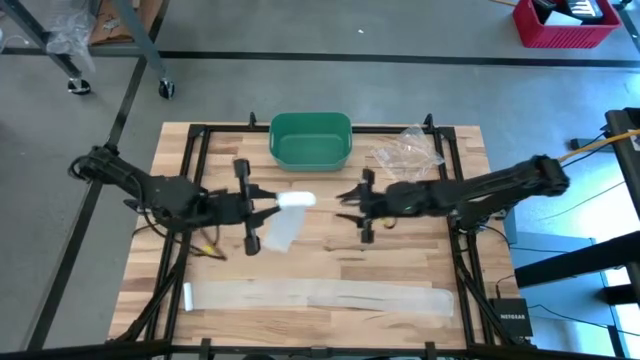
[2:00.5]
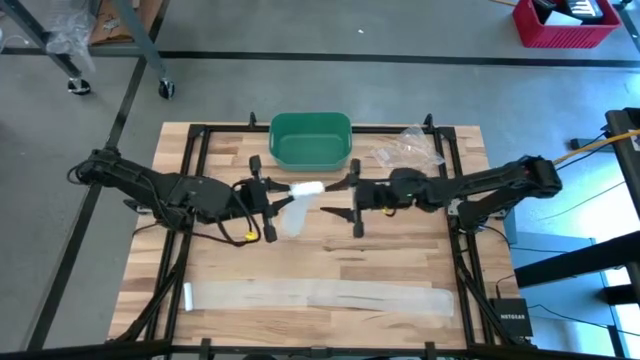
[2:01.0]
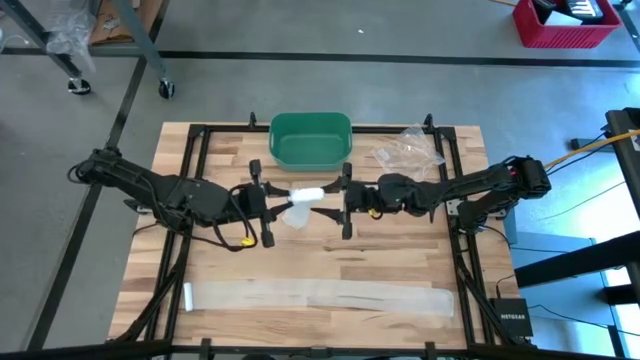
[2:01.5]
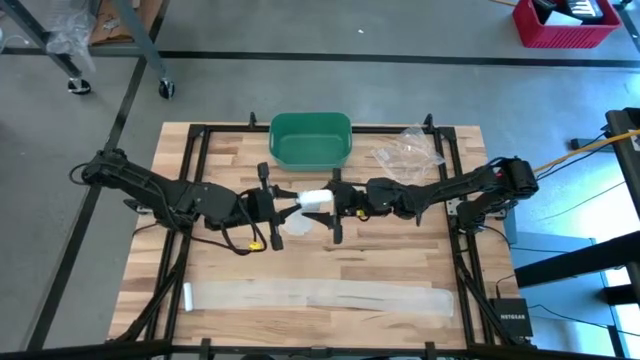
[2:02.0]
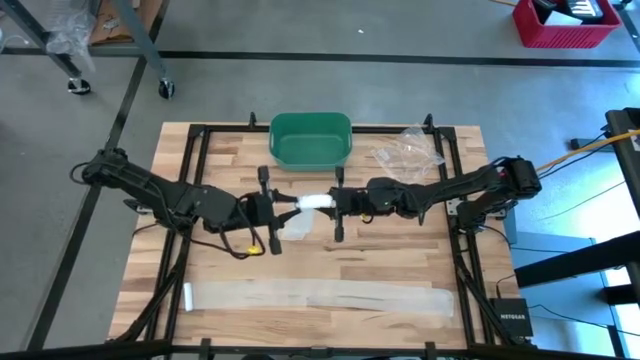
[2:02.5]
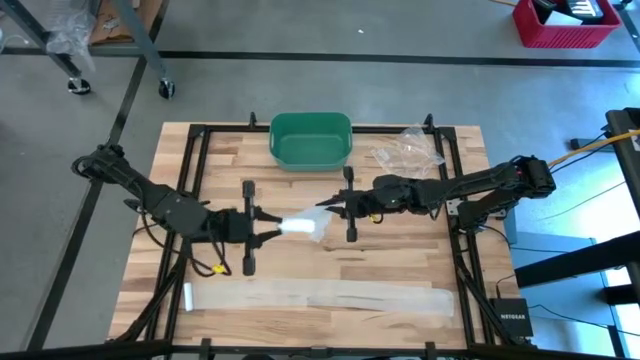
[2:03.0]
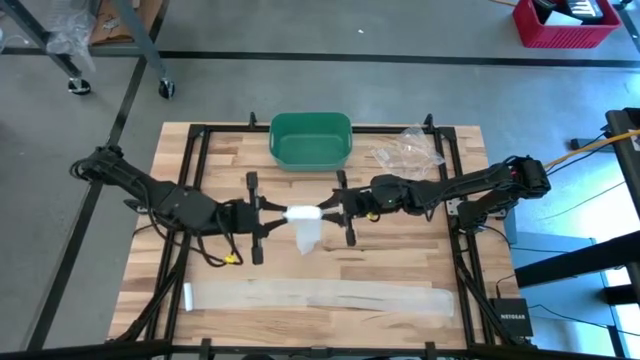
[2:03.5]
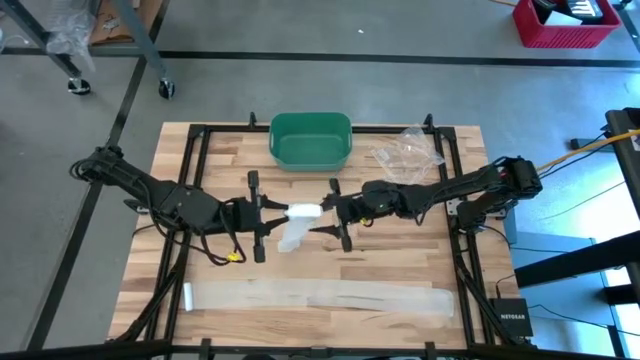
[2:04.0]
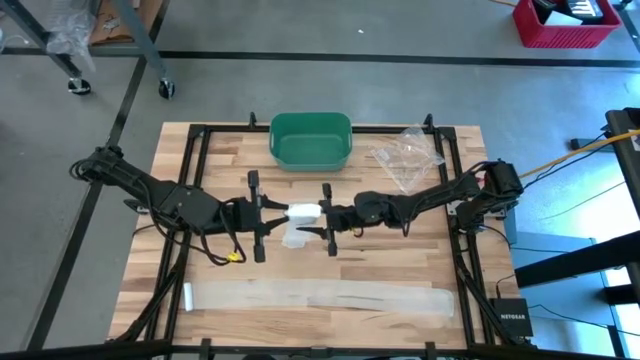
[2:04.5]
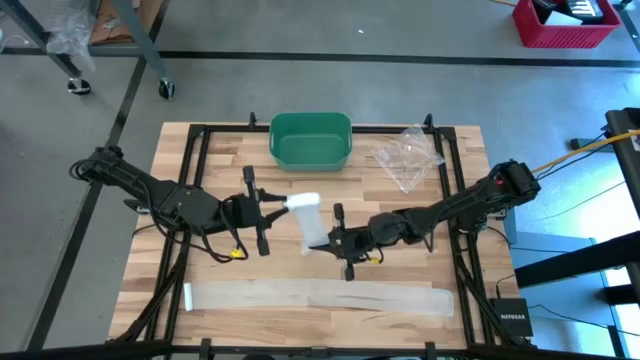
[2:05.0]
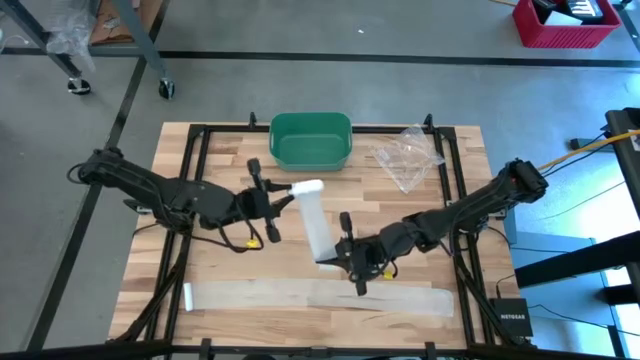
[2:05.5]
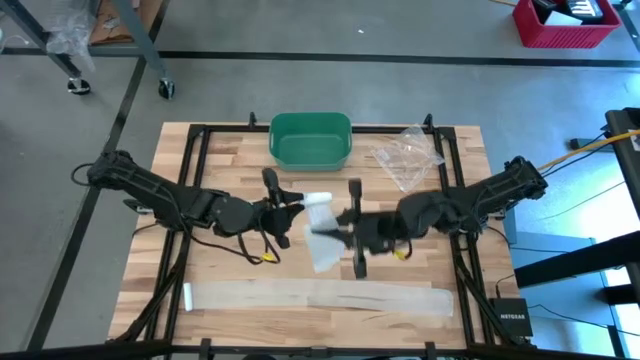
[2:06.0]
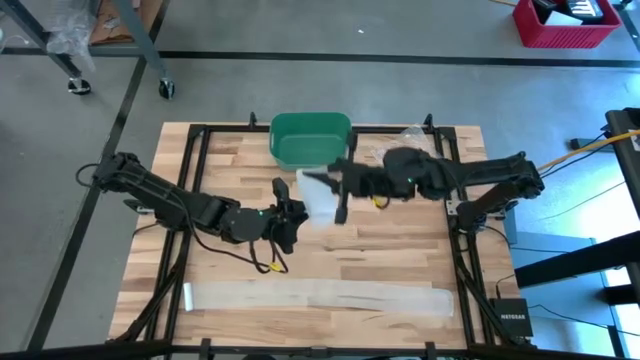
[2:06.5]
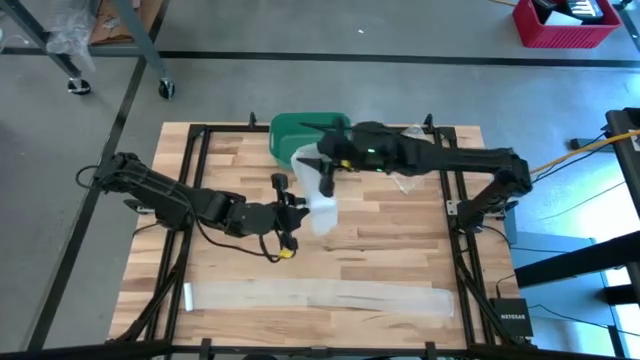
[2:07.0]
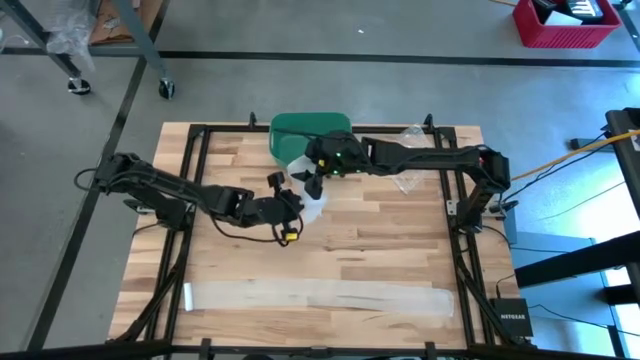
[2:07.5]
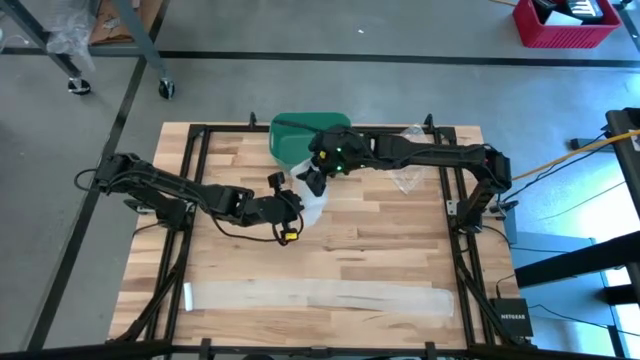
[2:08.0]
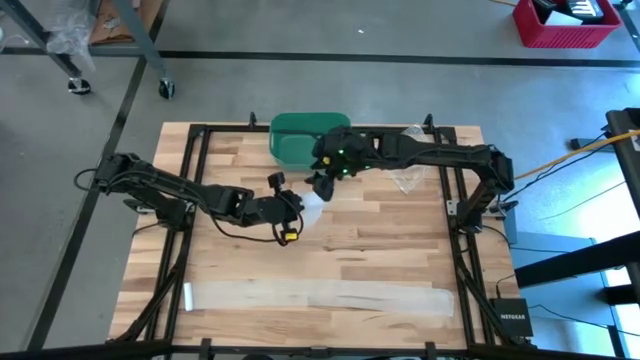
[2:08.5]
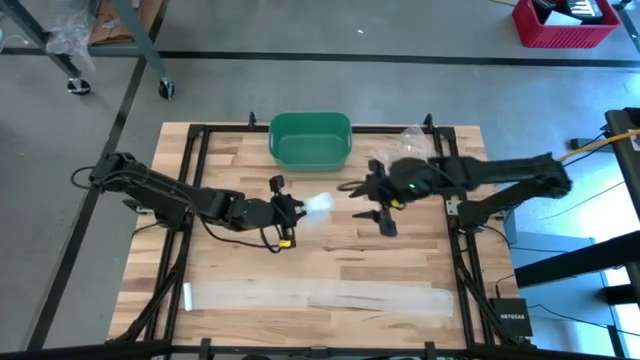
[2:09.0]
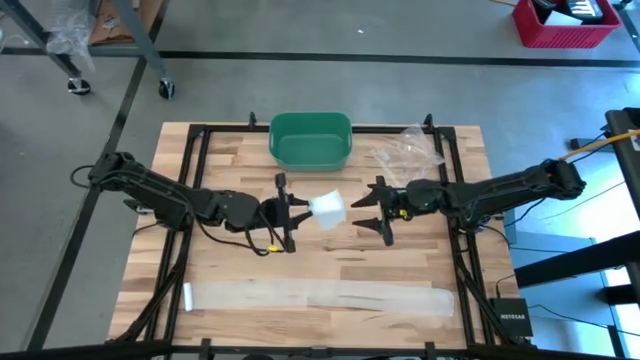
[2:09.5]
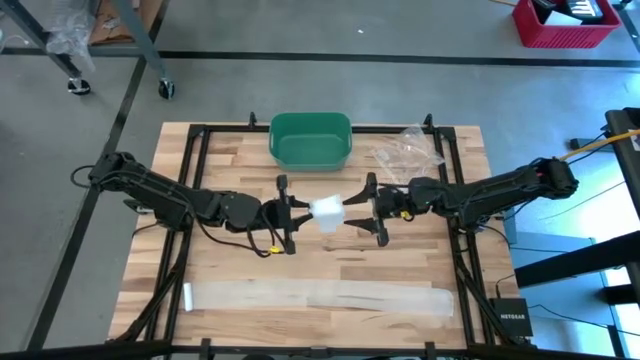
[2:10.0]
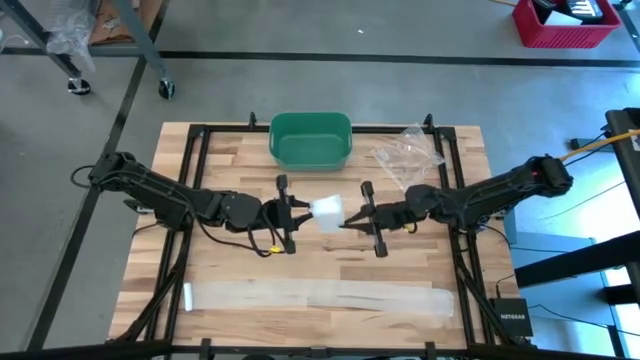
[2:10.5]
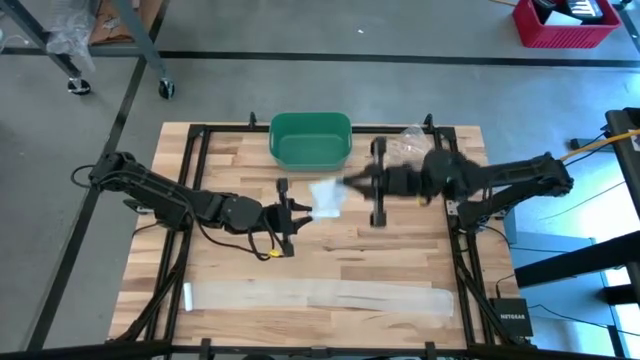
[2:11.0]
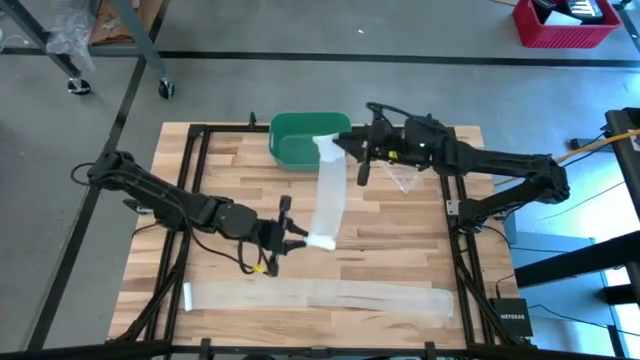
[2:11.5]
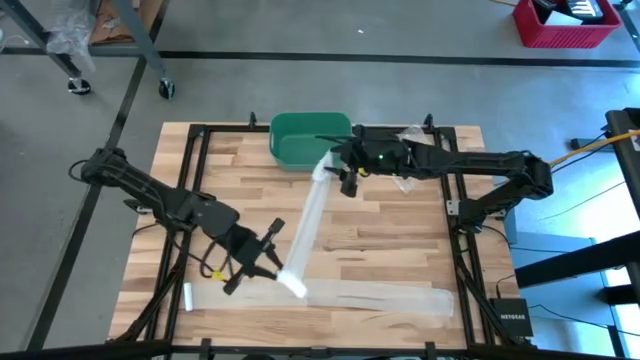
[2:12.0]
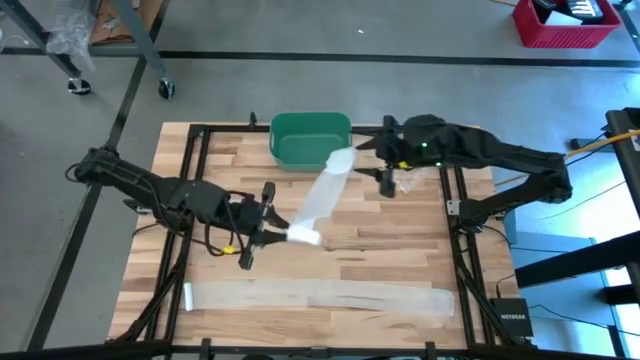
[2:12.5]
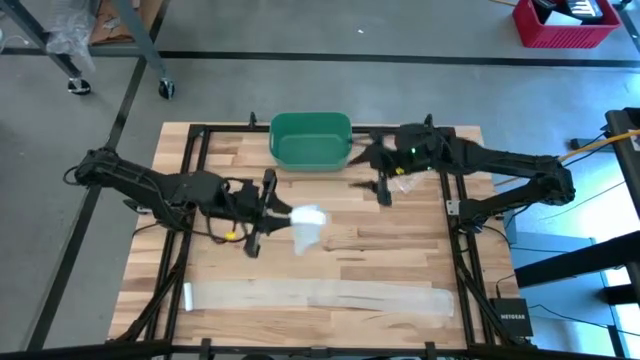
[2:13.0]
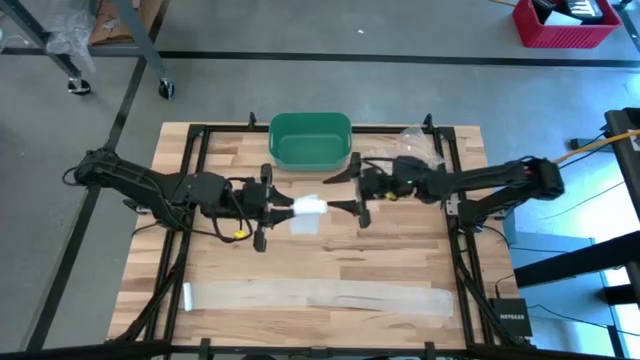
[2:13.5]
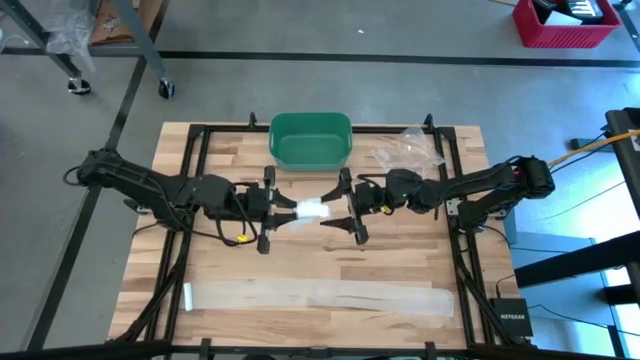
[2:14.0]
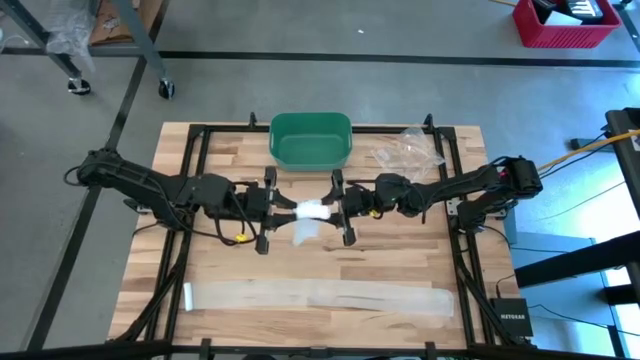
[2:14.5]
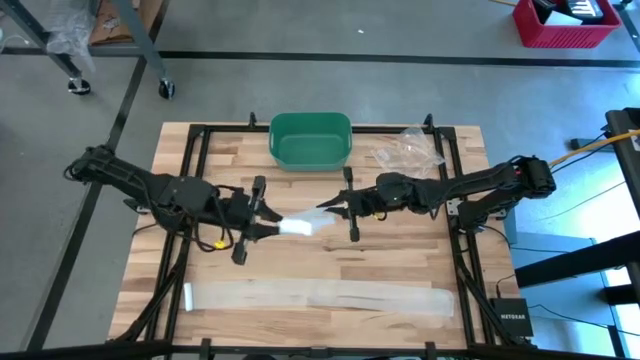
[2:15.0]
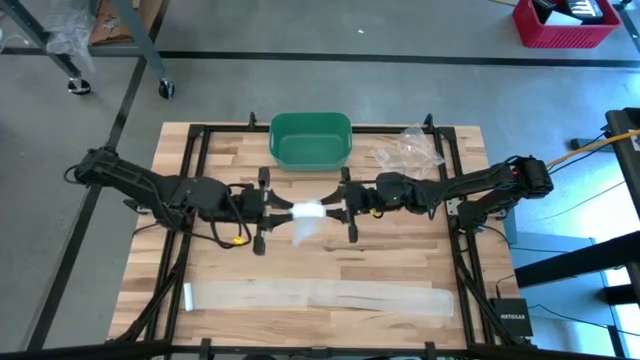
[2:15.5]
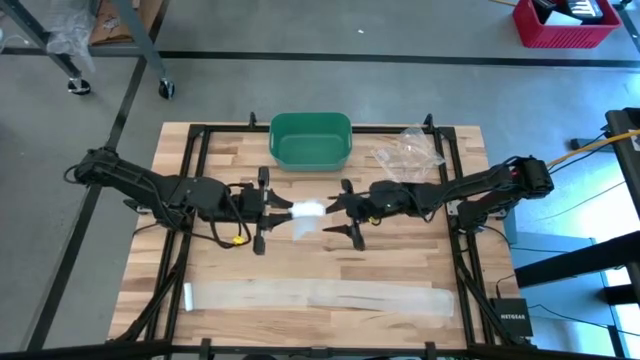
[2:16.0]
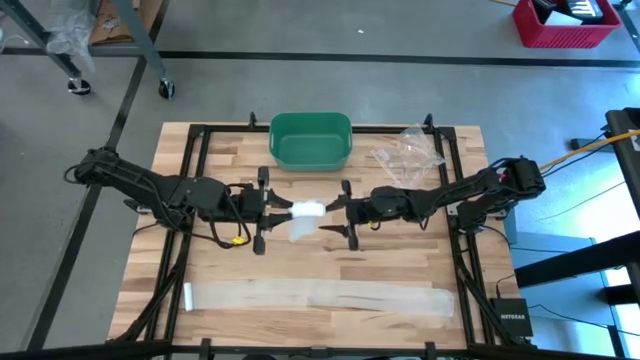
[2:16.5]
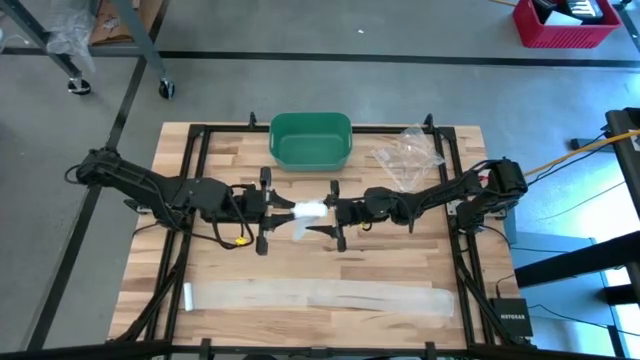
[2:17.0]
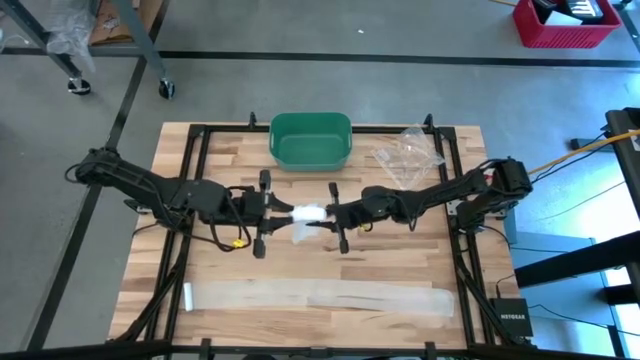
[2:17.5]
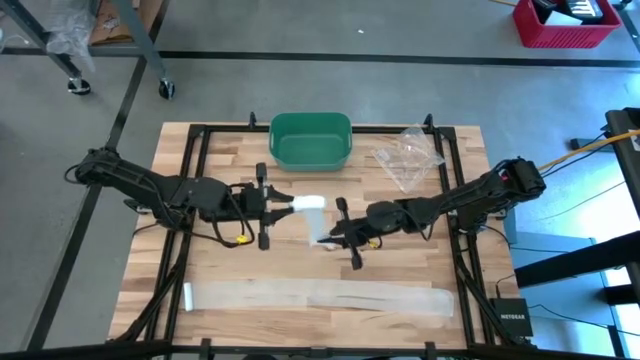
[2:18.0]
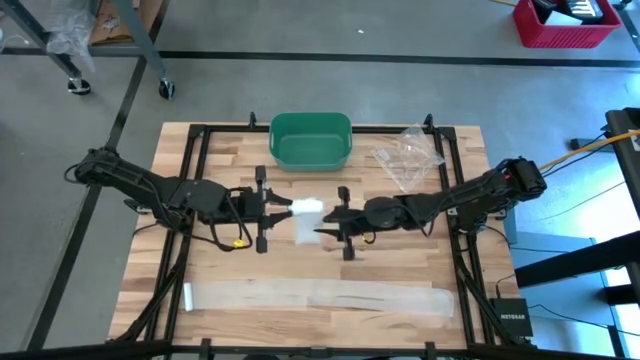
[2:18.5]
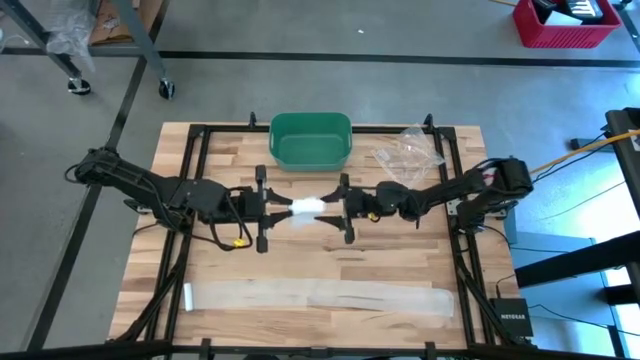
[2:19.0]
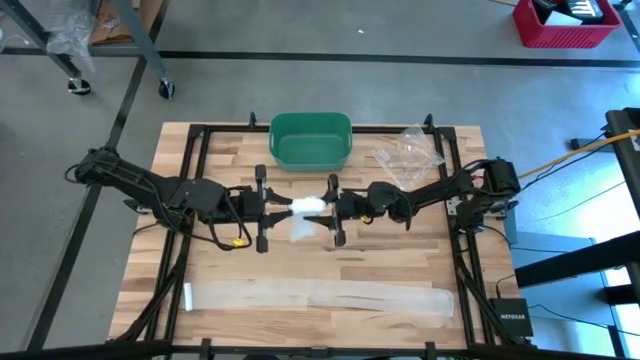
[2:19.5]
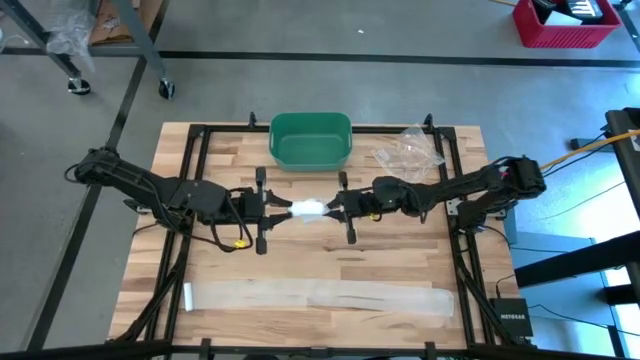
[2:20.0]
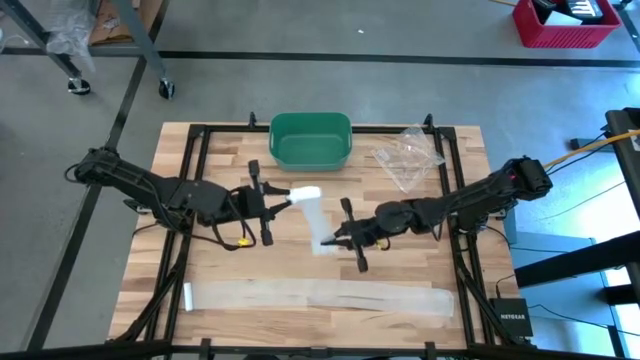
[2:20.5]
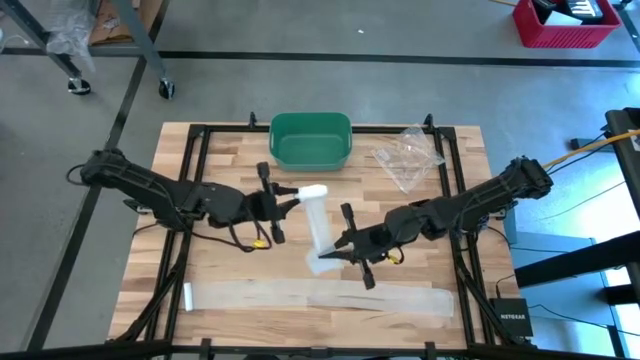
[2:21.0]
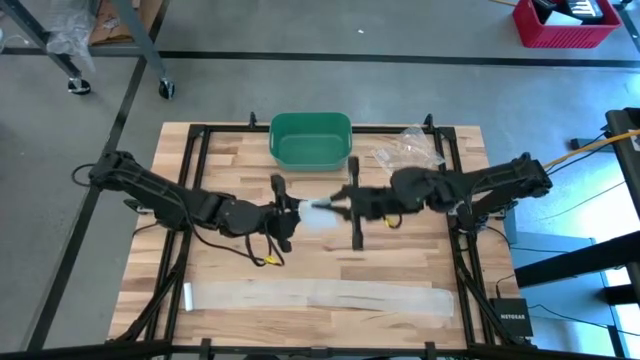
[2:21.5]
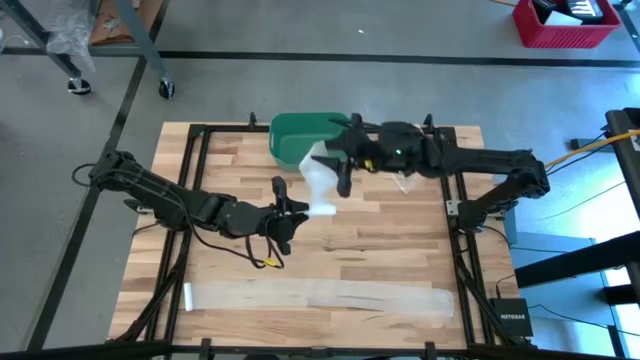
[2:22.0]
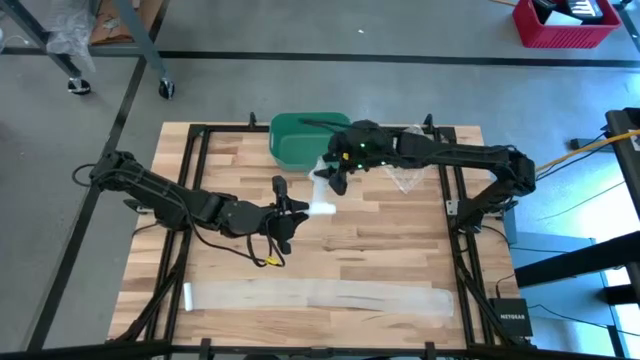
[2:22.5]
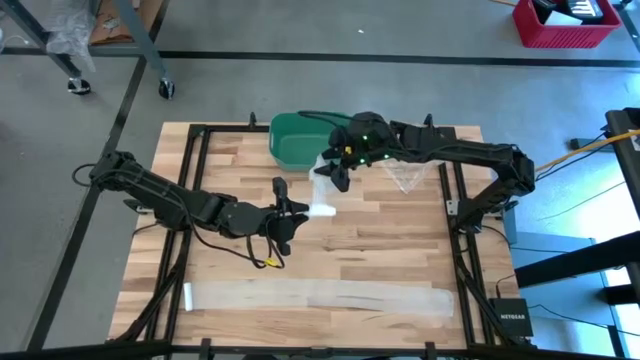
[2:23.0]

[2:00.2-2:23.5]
Task: Roll bandage
Roll the top white bandage
